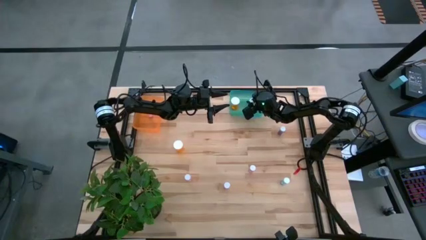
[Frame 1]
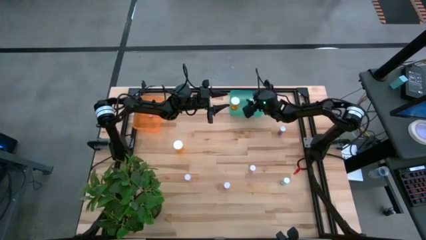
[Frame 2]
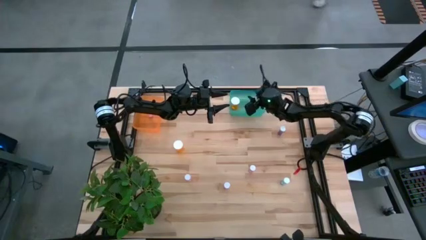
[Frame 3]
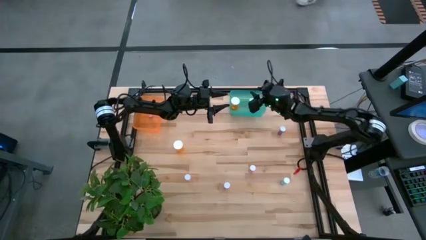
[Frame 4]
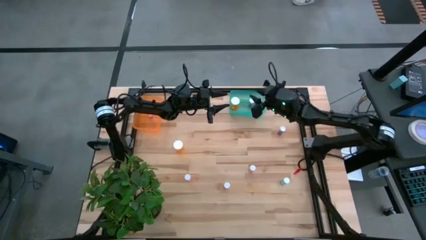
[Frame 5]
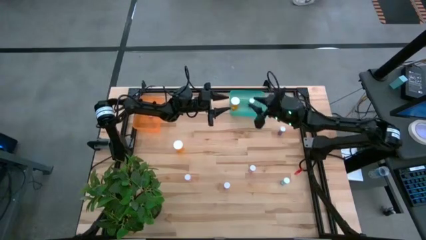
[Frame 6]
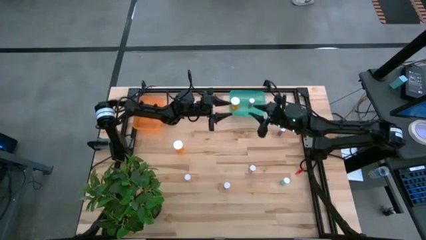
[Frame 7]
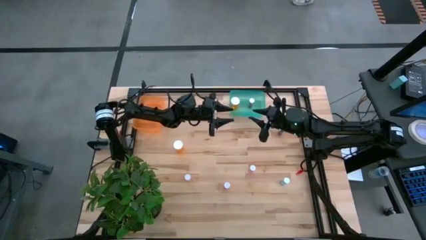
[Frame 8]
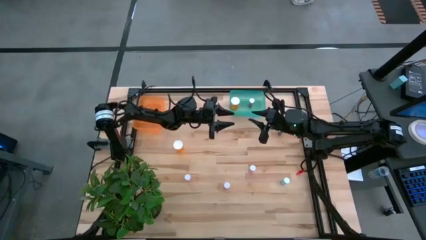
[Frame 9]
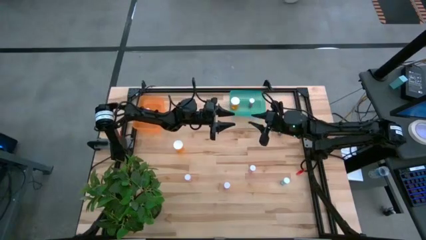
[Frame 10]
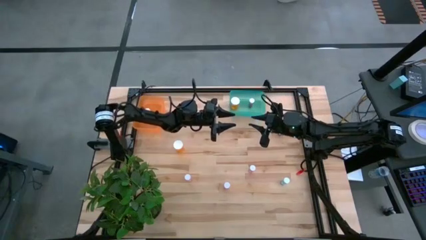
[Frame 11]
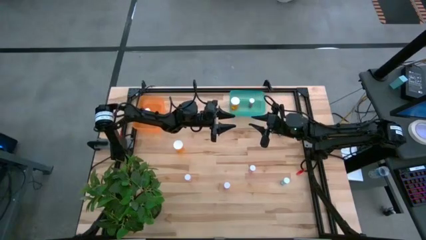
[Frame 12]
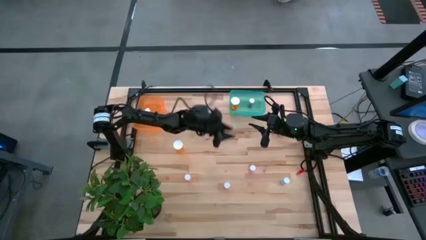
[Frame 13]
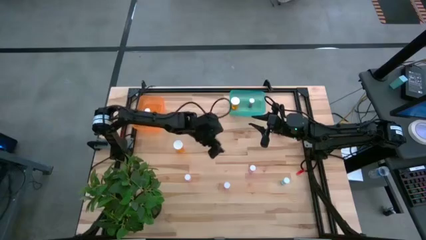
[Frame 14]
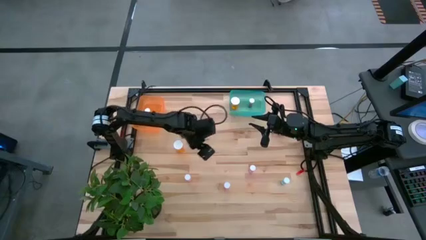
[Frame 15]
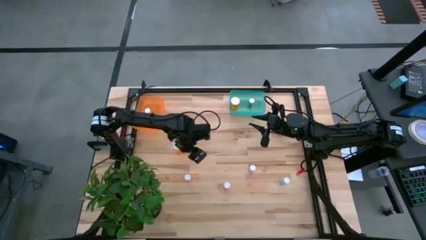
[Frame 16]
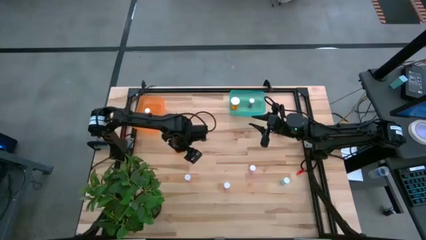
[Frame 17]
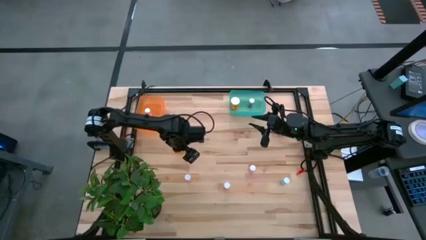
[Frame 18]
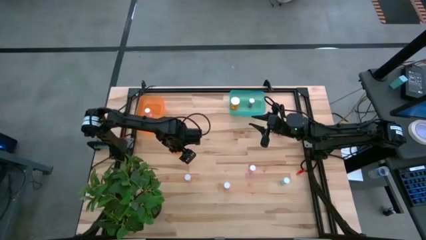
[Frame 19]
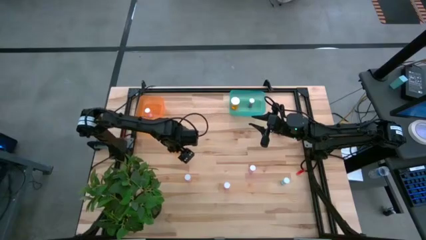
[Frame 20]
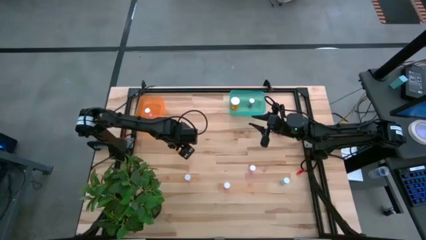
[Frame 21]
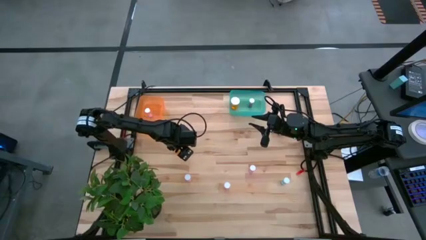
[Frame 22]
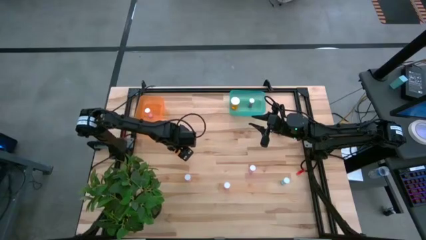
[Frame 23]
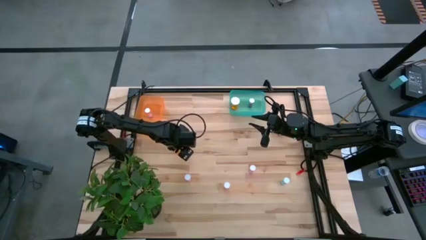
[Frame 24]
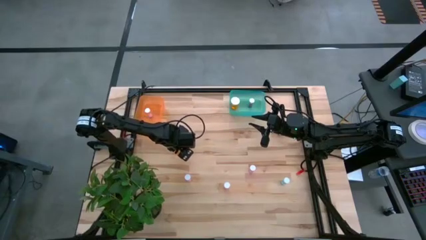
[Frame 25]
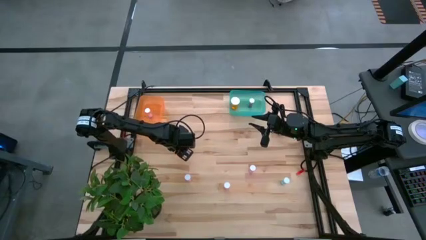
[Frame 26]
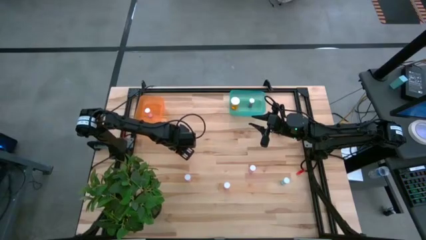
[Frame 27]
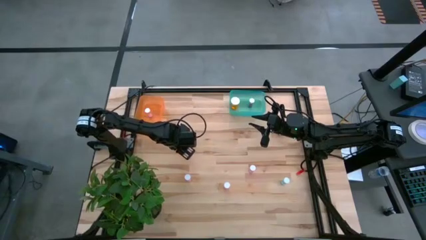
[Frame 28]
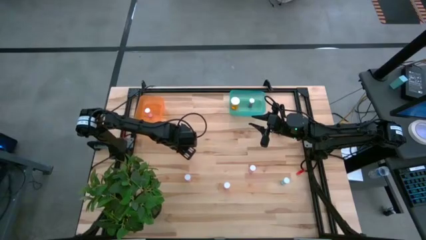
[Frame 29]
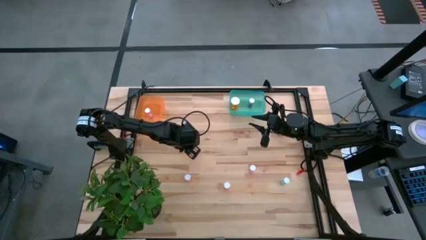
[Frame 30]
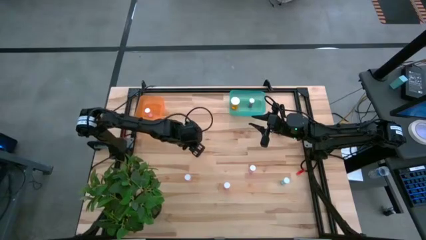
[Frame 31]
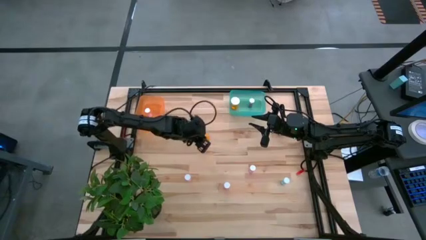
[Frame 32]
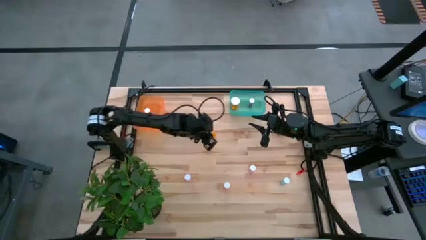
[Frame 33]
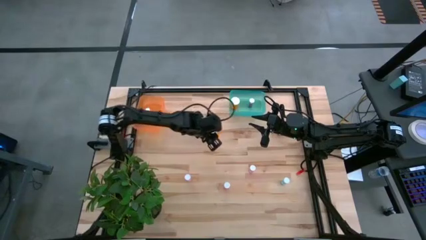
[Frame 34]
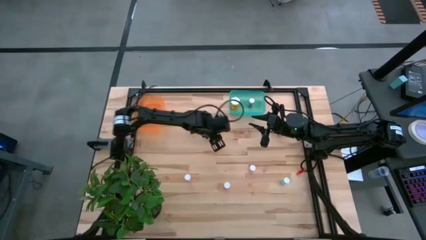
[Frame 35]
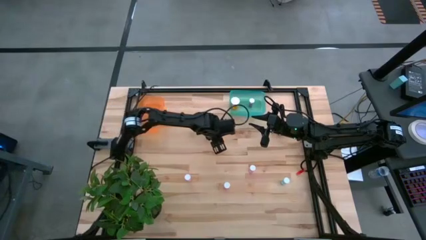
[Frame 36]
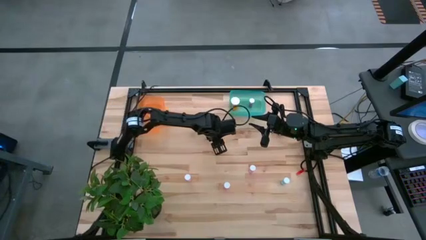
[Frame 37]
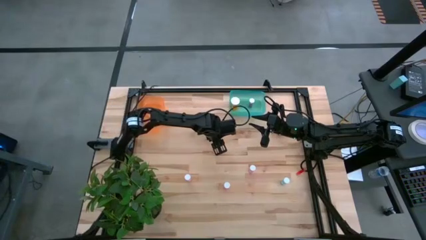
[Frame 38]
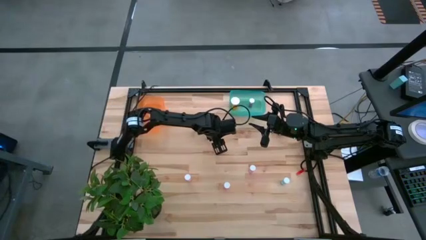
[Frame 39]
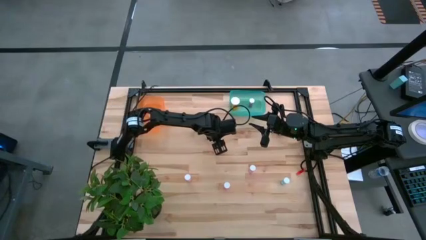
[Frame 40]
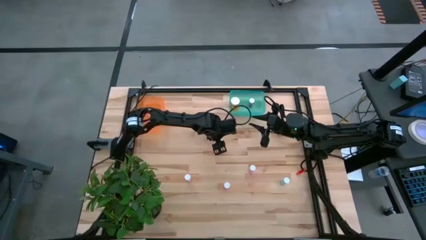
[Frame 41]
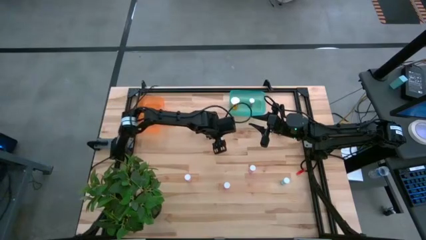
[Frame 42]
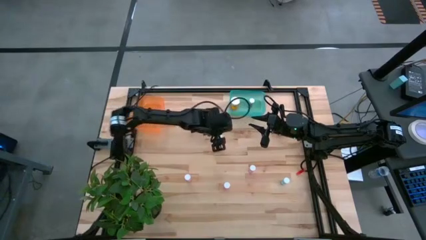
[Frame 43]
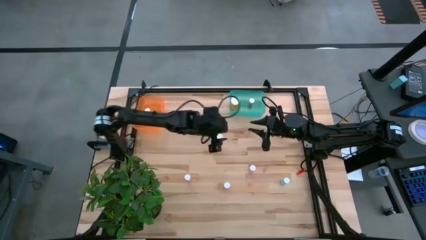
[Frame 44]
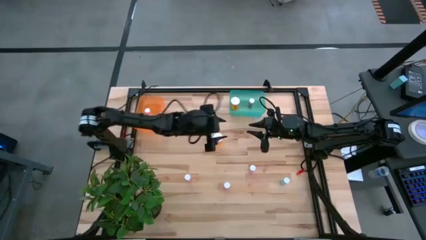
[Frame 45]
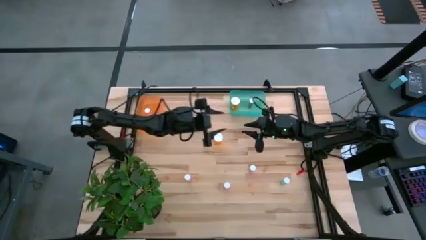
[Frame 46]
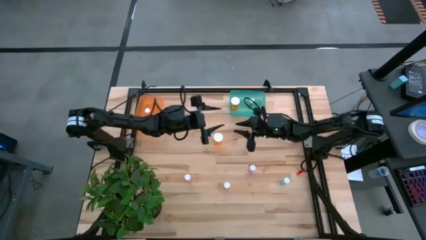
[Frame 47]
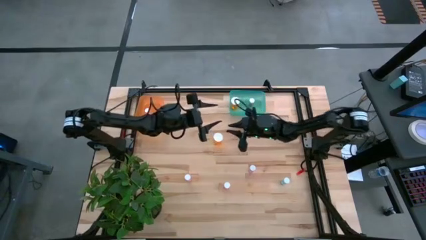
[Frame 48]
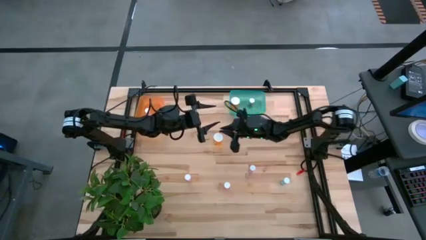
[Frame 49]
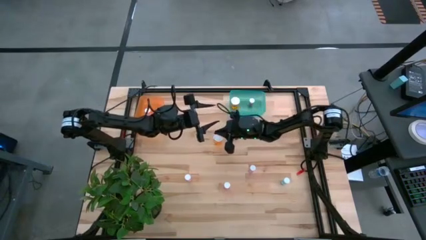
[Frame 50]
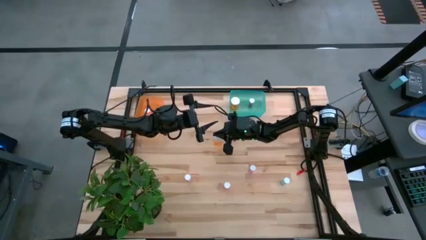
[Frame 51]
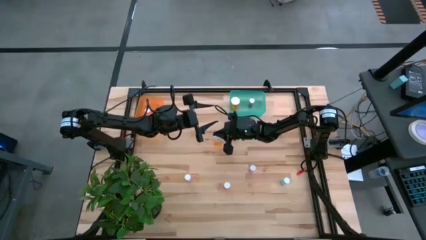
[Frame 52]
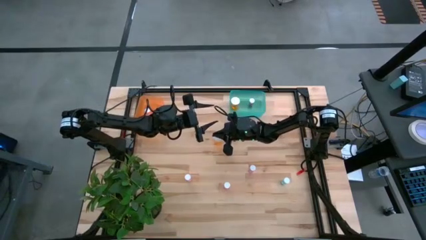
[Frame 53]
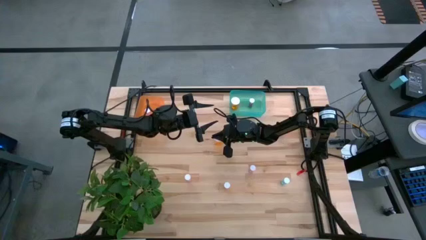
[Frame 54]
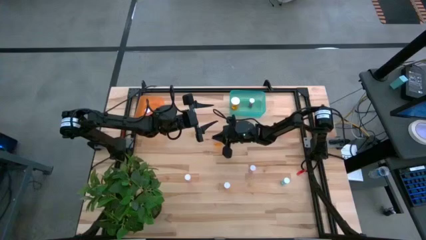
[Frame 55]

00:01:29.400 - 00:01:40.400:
Task: Pick and place medicine bottles into bin by pill shape (circle, oval)
Put the orange capsule bottle into the green bin

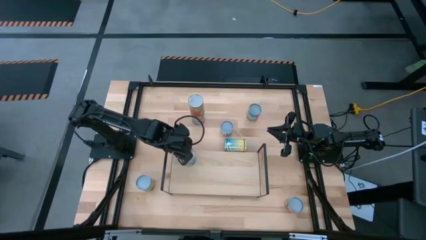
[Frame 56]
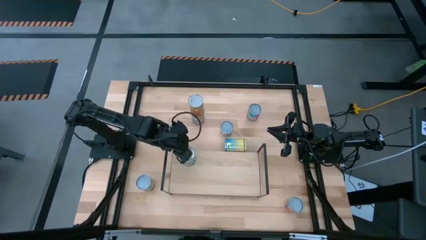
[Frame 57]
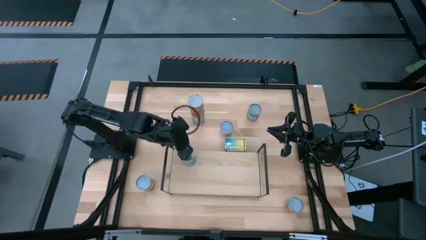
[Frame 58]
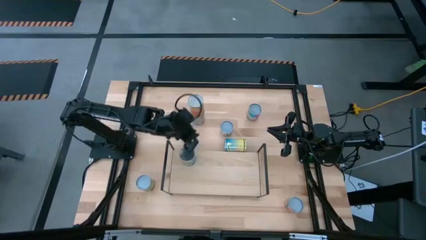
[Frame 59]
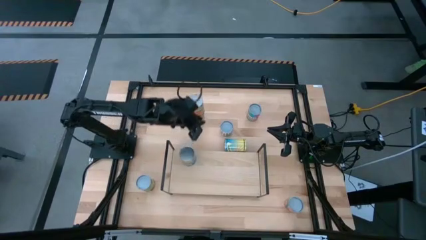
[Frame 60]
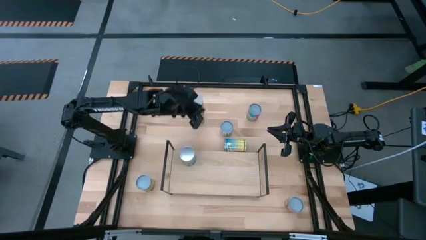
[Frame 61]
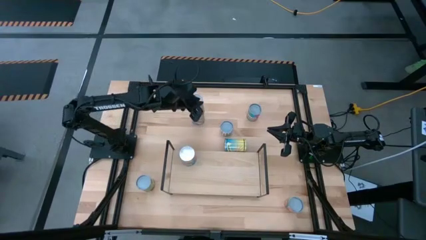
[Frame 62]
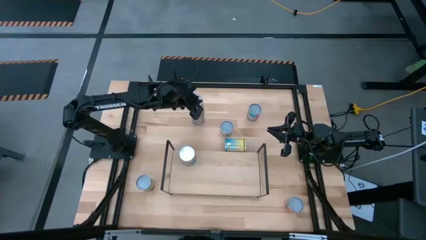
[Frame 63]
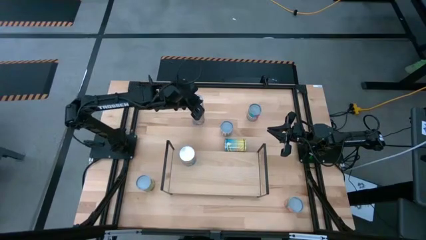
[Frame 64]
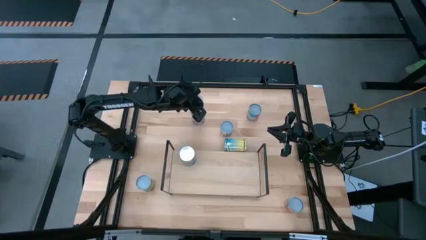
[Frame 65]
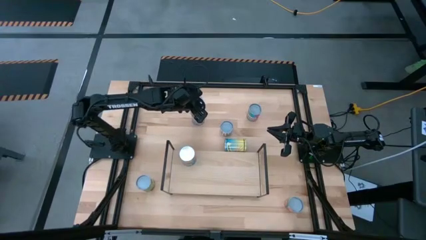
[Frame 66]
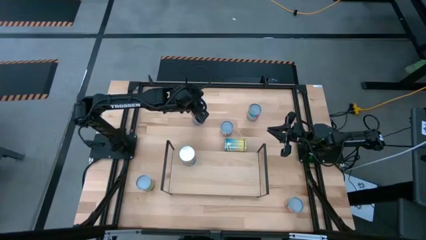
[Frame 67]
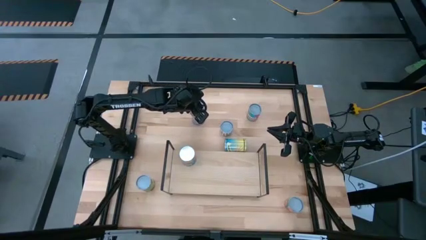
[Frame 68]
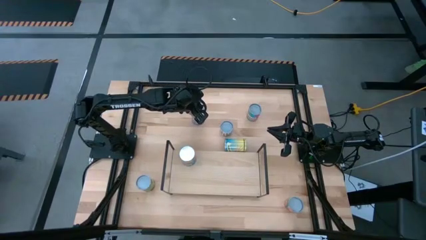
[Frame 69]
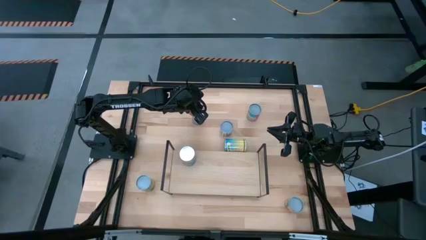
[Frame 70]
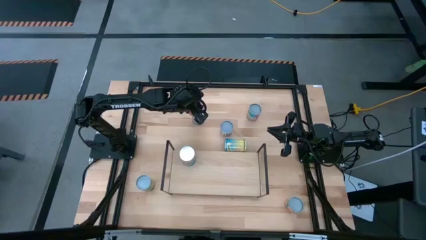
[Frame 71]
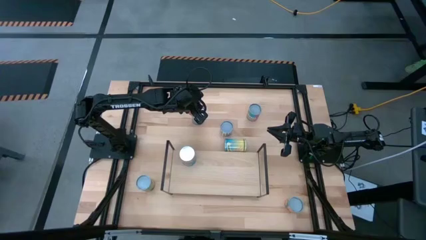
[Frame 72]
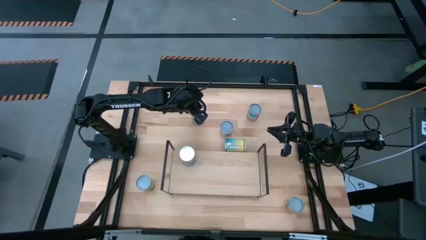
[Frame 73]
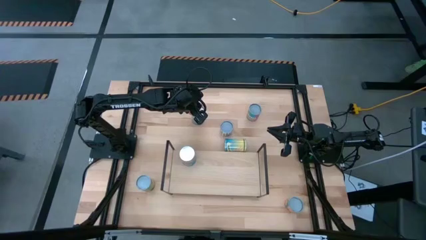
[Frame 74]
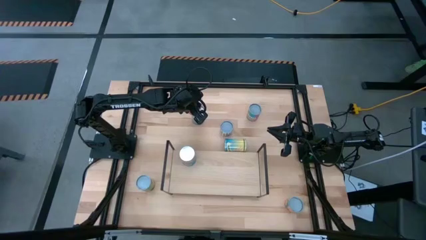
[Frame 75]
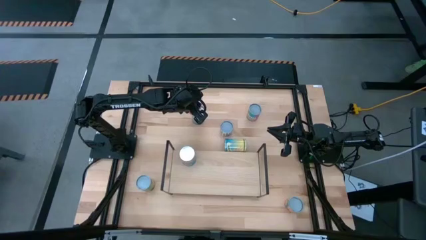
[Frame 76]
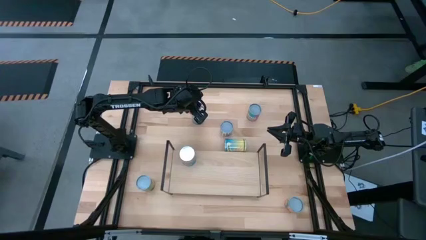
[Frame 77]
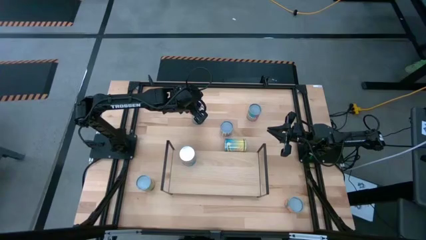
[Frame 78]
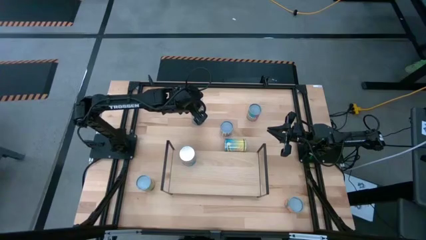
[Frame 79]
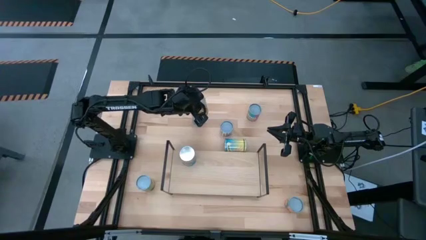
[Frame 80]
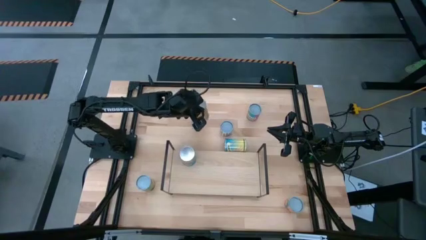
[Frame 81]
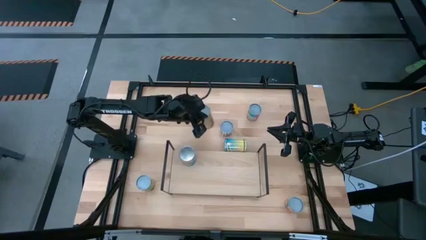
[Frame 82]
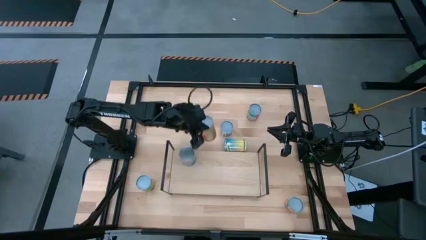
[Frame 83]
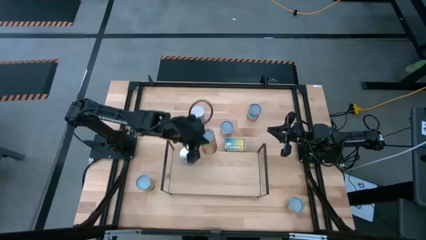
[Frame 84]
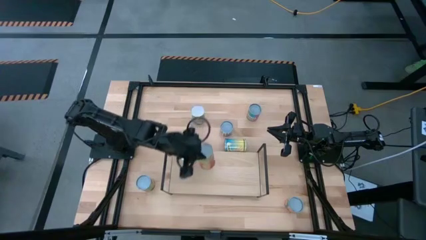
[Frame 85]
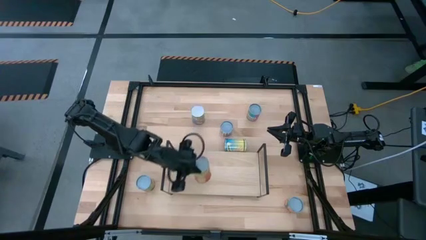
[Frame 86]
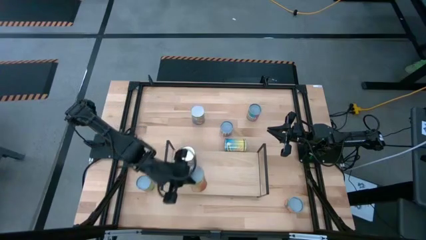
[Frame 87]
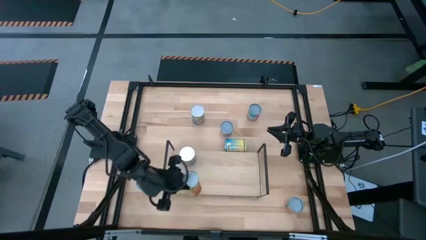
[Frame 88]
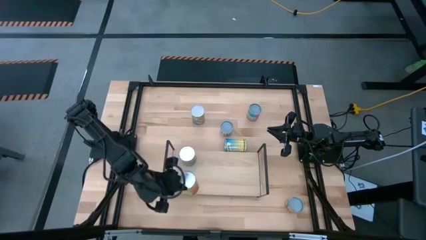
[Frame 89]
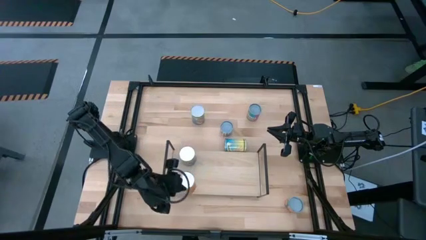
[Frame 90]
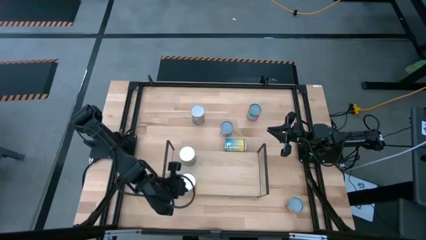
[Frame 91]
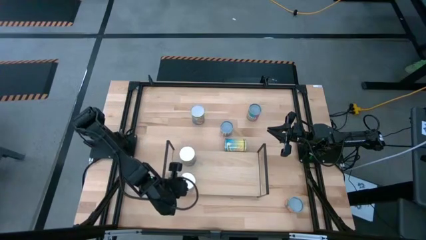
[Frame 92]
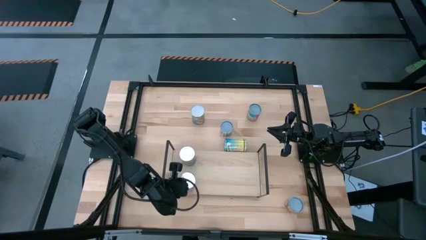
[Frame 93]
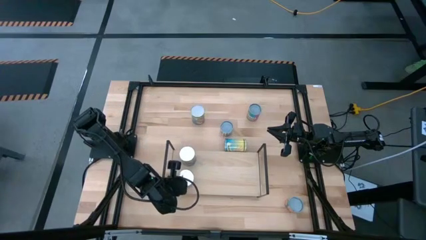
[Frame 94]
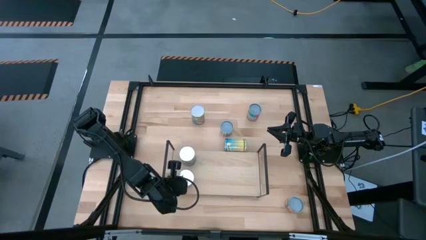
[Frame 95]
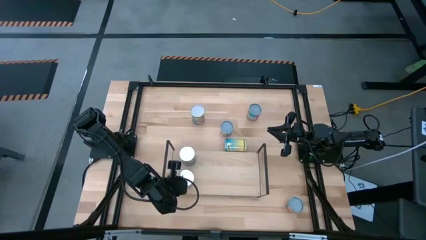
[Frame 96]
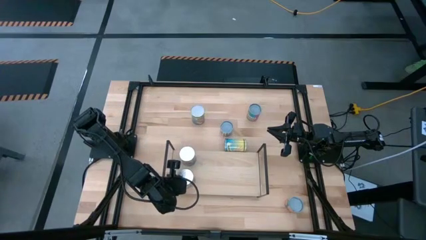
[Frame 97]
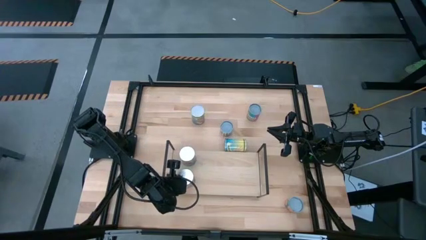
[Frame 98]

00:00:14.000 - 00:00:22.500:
Task: Pick and place cans onto a shelf
Put the yellow red canned pineapple on the shelf
